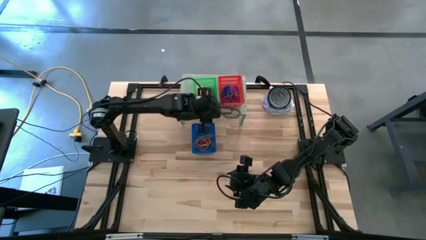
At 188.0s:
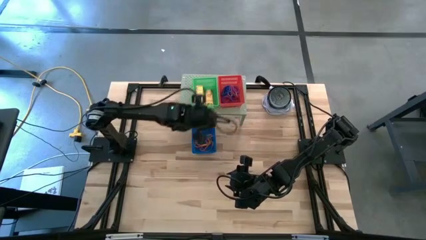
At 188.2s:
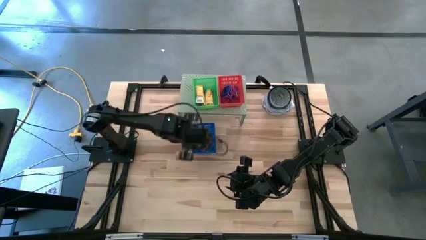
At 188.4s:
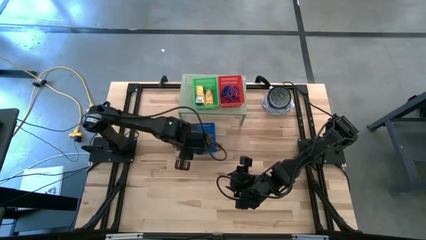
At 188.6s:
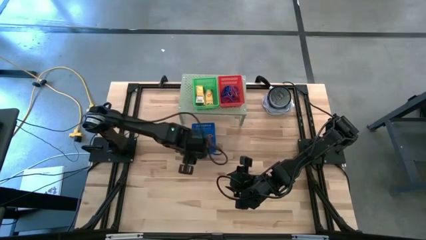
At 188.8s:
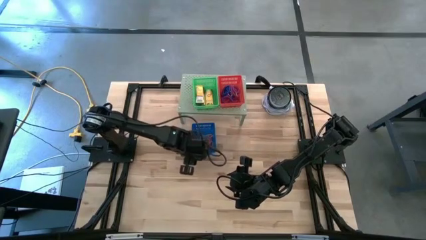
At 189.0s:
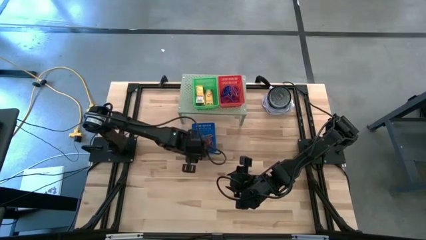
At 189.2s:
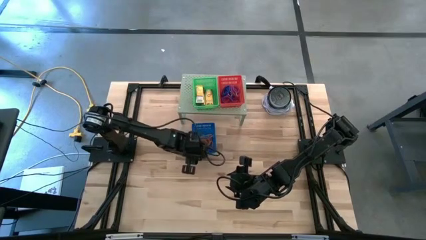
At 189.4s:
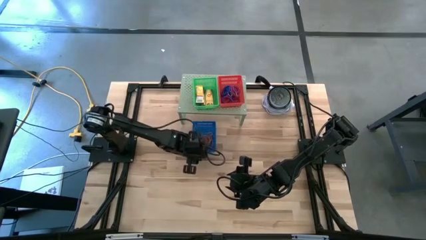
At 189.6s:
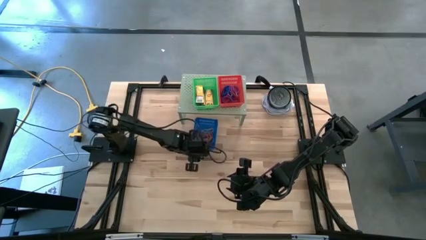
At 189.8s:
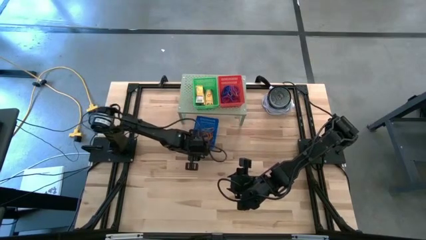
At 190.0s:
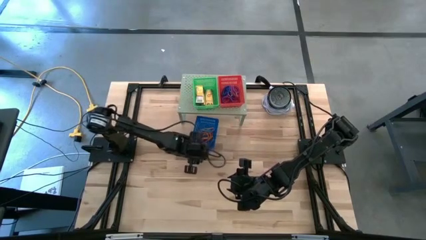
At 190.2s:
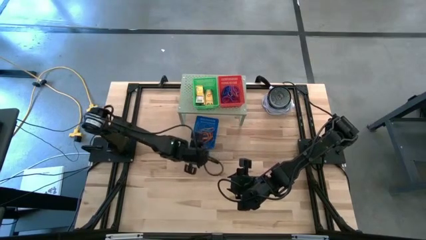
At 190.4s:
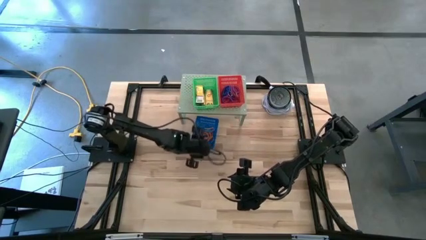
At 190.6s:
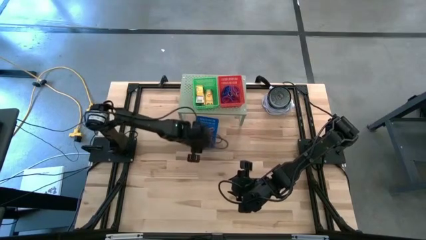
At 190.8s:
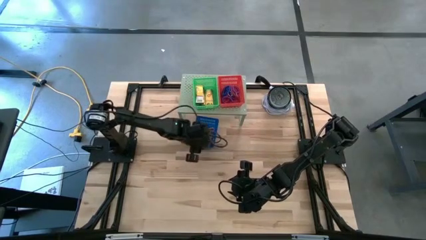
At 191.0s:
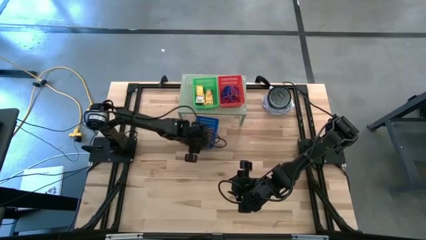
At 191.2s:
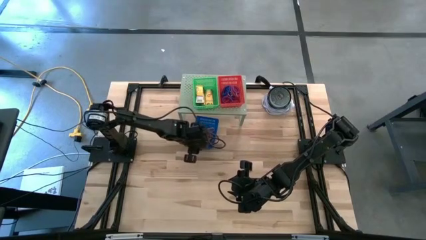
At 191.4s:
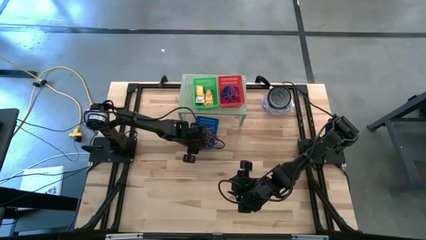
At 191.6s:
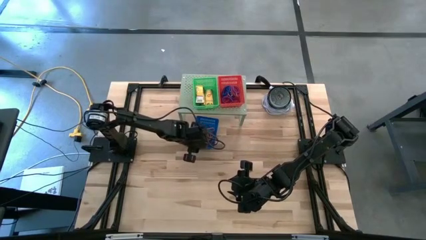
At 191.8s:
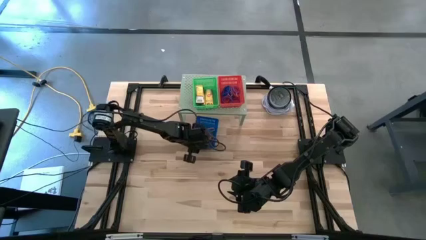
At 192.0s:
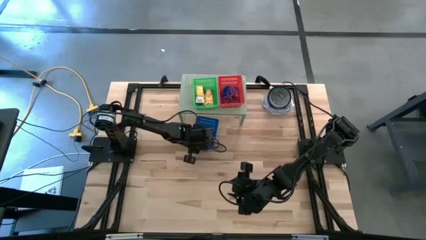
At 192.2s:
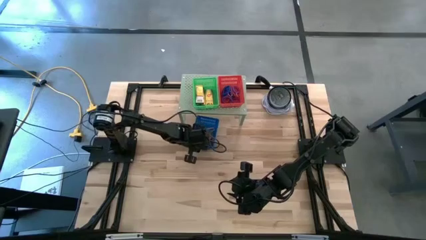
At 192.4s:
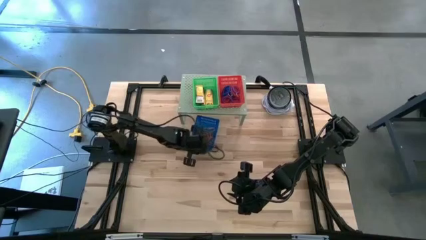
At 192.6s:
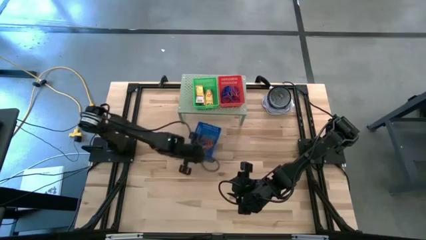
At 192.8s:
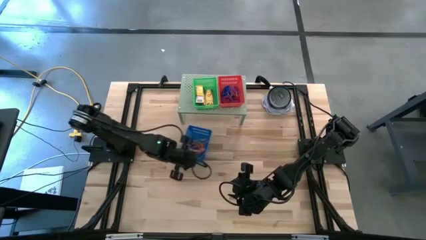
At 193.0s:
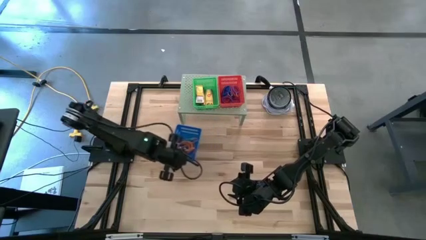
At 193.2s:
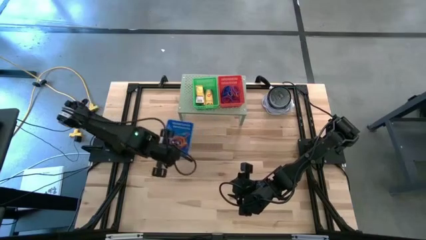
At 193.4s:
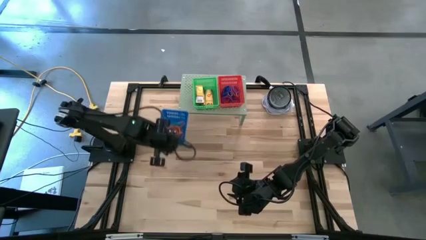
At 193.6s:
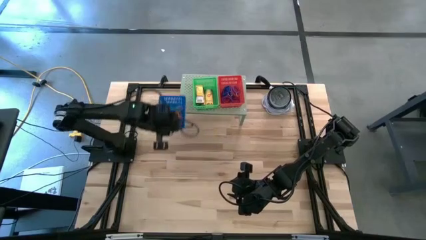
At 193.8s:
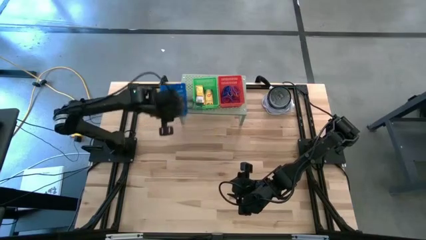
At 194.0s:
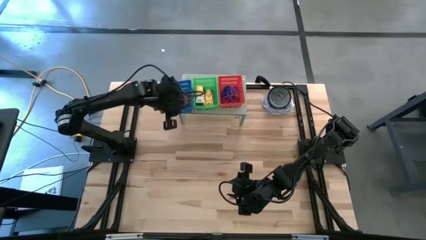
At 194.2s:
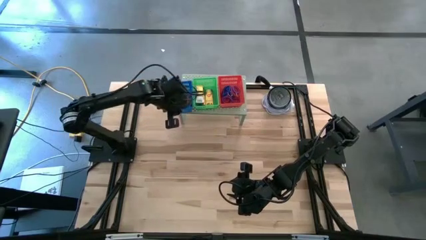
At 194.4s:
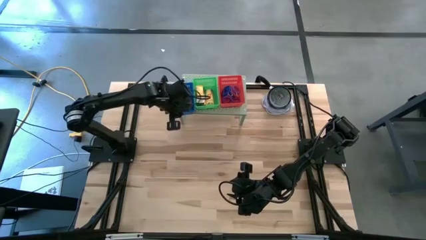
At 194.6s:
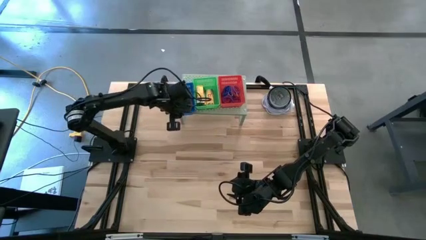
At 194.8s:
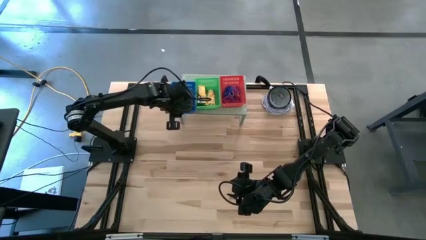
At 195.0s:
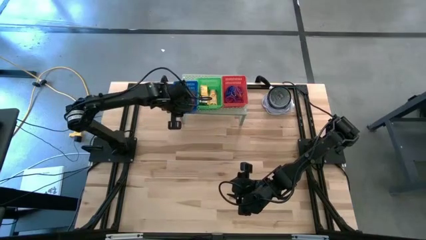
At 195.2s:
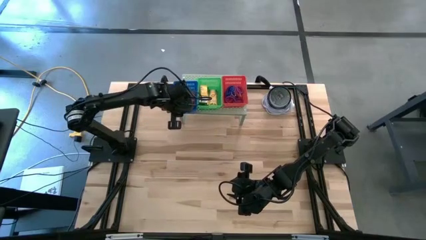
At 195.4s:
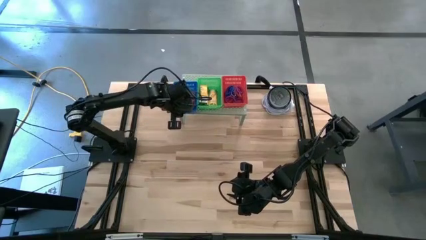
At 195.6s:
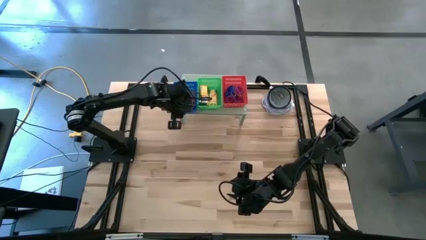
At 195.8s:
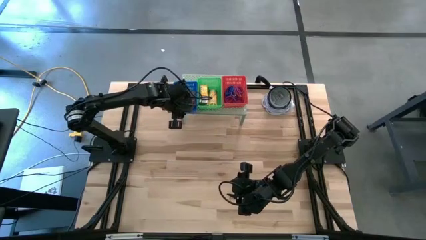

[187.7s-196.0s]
Task: Pick & Place Office Desk Supplies
Put the blue bin on the shelf

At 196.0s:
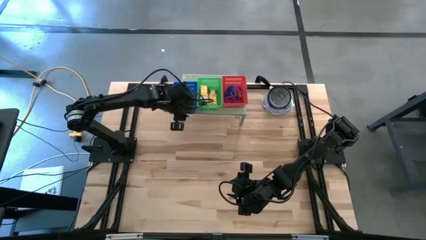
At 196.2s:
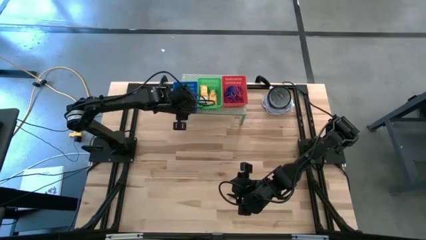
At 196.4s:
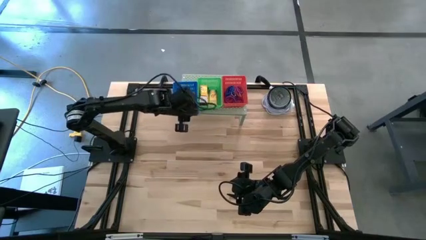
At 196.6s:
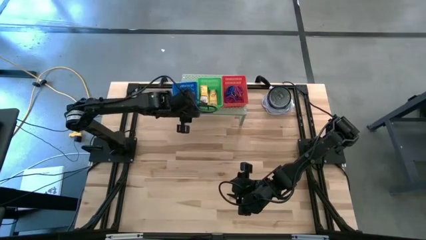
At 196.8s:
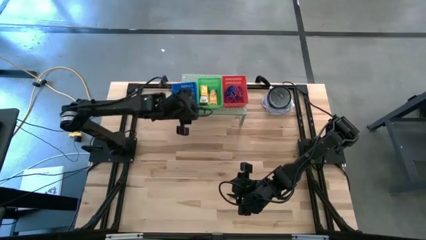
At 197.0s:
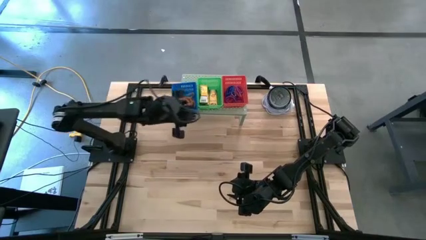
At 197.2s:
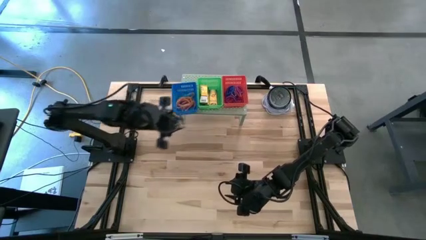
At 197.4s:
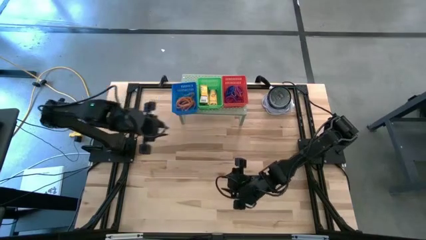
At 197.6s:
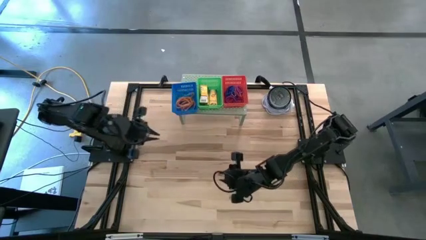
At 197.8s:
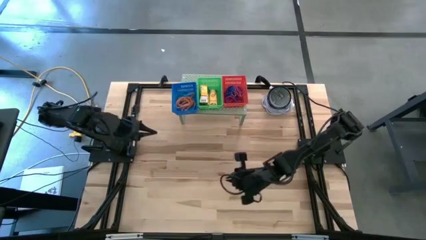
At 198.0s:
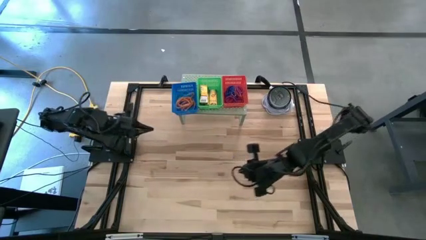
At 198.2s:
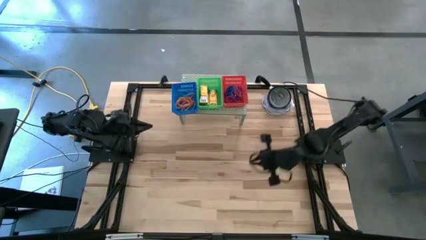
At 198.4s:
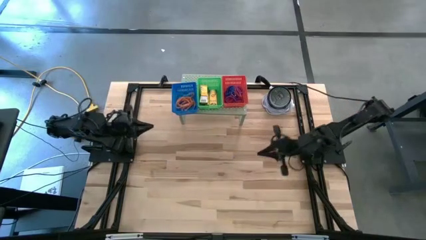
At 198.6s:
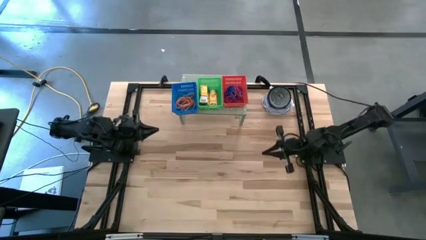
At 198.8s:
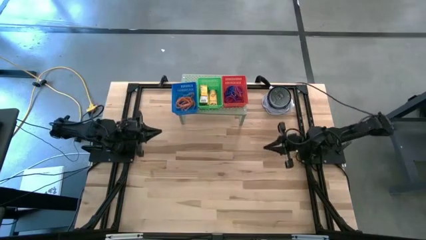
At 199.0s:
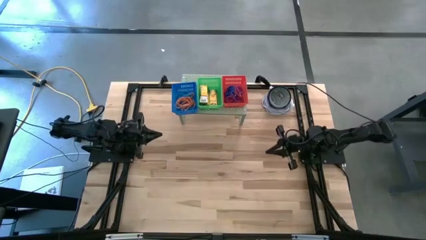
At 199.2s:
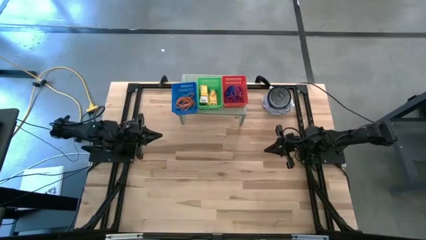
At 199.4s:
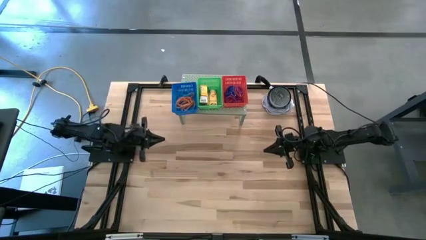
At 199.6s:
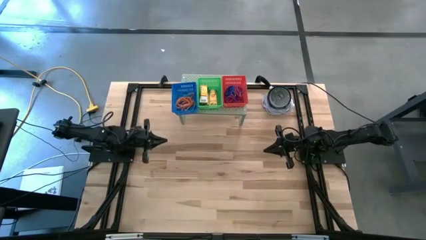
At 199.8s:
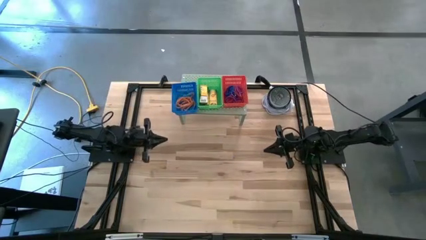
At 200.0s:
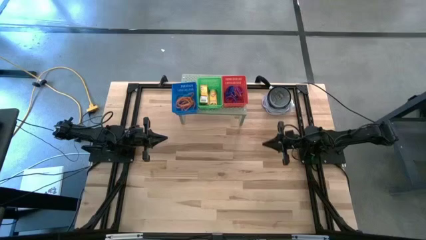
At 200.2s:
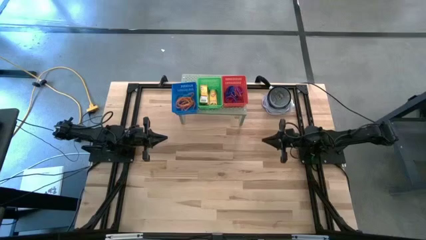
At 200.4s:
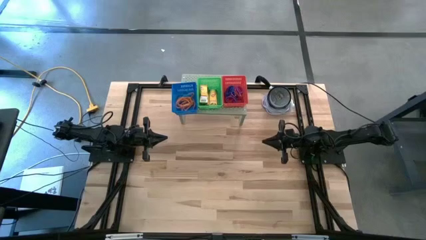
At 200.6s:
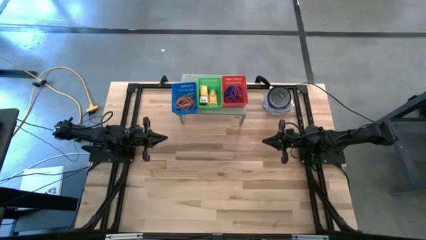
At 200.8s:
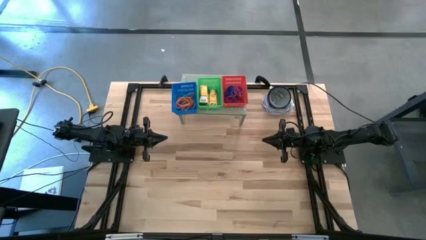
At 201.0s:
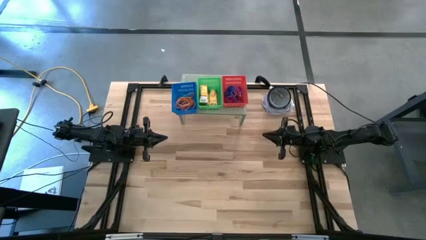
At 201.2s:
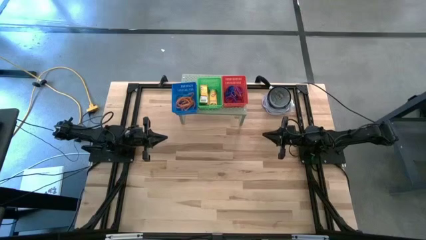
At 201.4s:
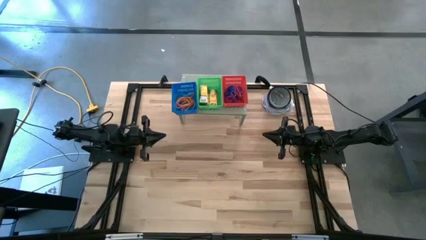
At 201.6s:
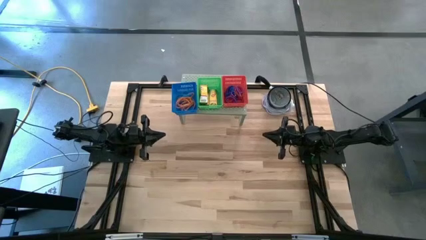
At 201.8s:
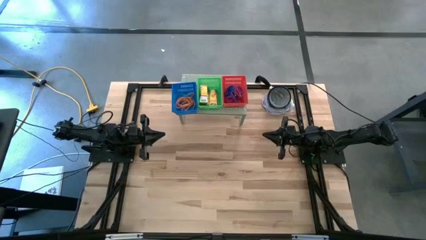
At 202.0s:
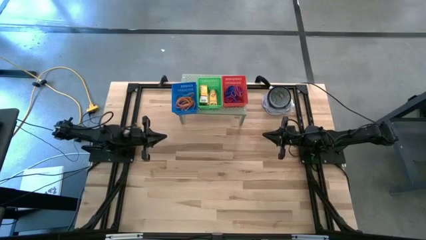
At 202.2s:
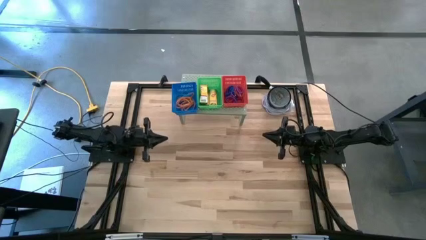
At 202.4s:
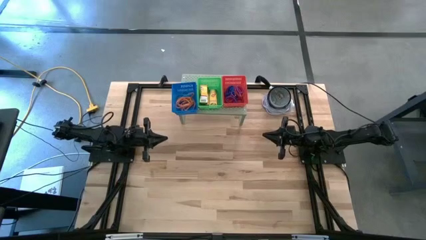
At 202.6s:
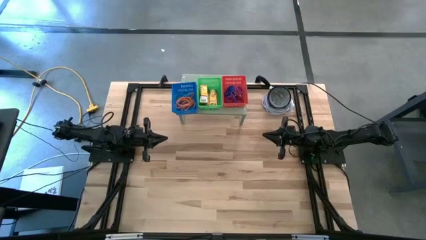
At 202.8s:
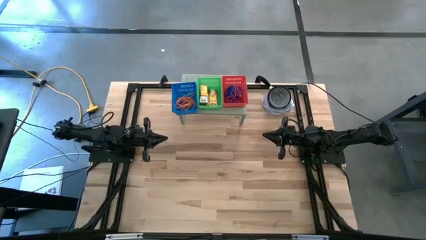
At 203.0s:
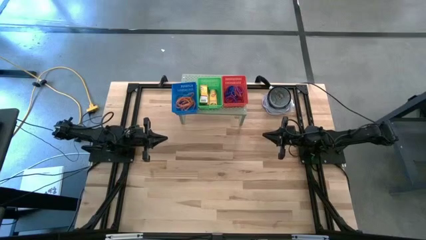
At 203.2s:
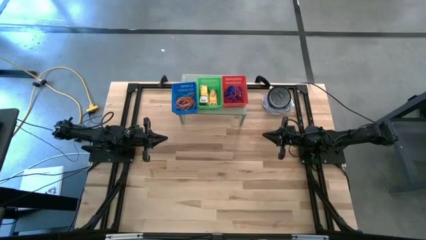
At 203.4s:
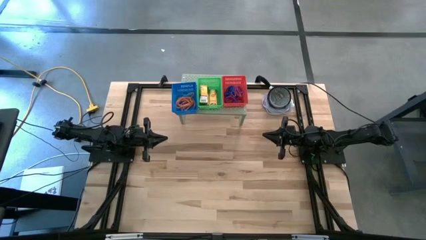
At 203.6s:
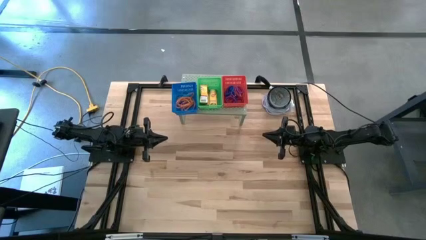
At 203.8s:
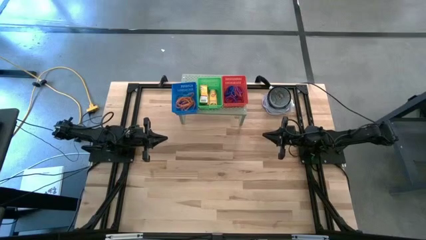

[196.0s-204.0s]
Return to home position

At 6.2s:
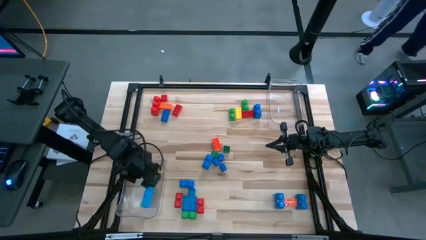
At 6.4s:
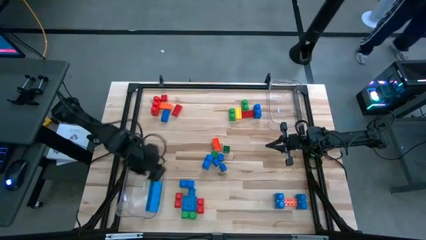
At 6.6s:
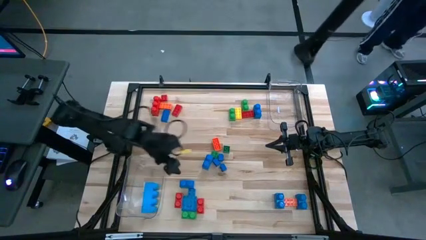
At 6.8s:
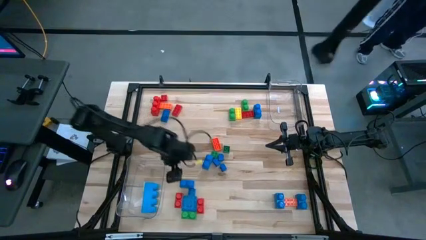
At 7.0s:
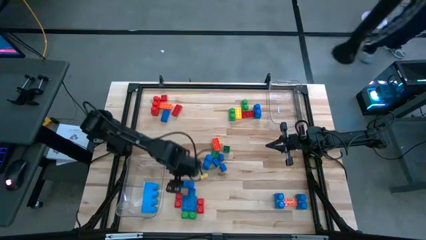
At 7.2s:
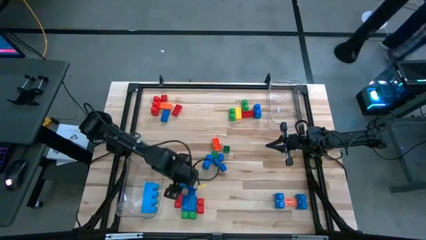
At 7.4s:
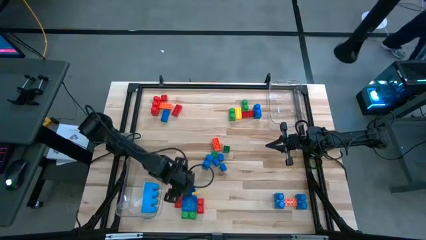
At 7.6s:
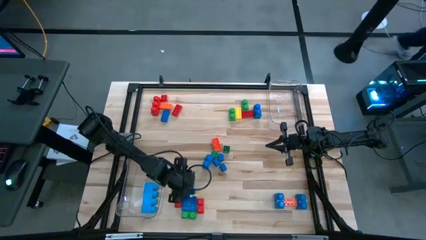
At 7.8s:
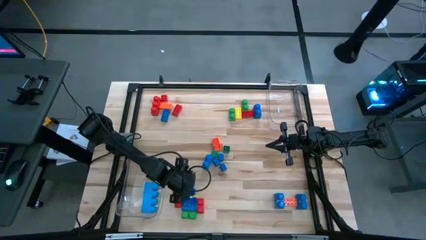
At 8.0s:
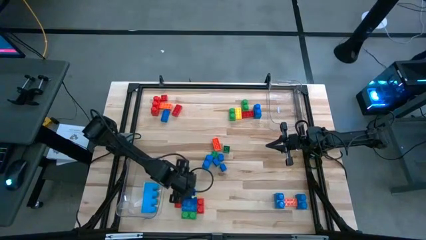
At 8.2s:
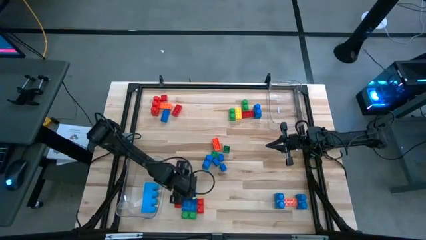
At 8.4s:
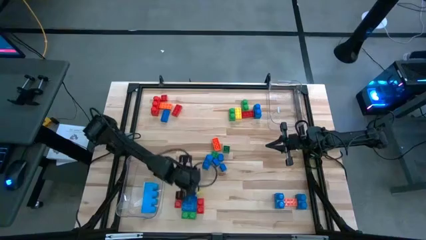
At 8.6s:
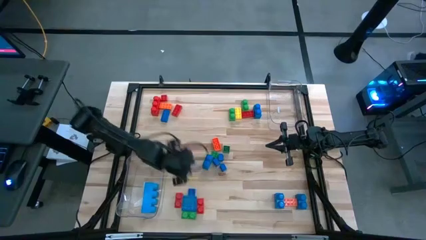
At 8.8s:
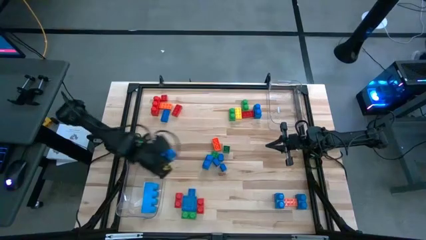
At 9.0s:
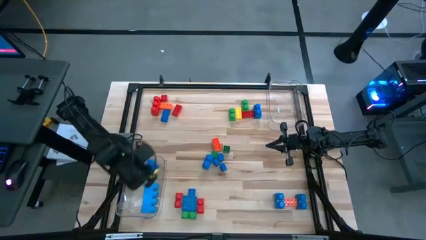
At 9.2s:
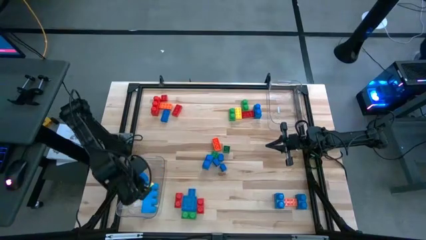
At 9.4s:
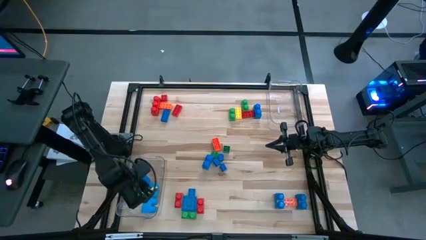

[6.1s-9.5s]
Task: Sort blocks by size
Put the large blue game piece into the bottom transparent bin
